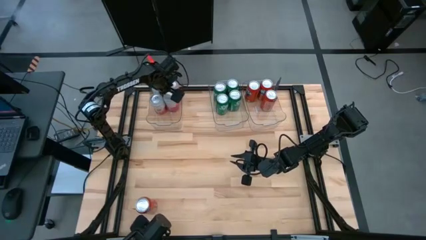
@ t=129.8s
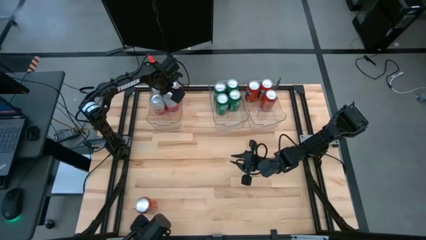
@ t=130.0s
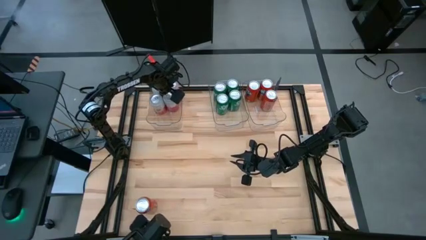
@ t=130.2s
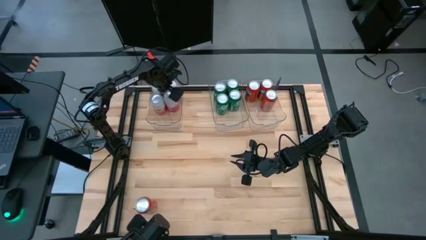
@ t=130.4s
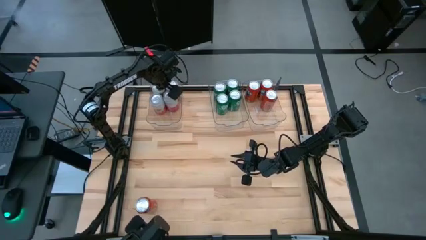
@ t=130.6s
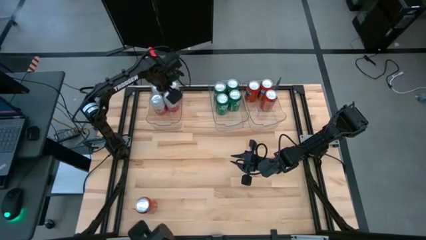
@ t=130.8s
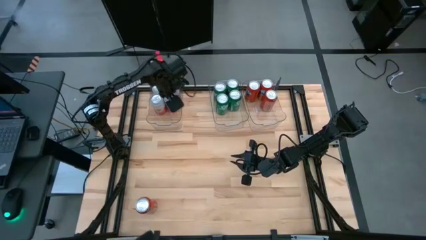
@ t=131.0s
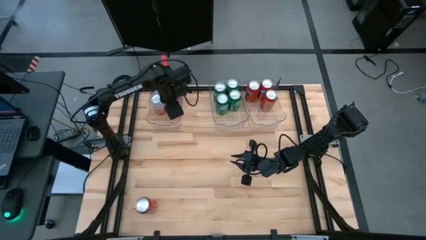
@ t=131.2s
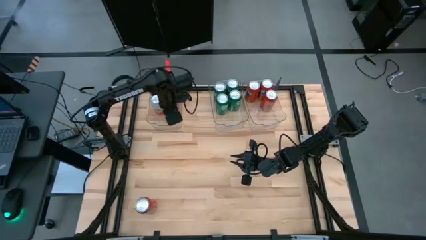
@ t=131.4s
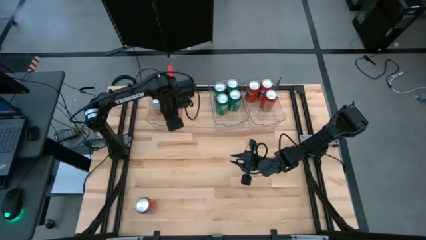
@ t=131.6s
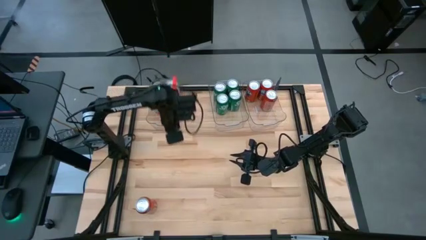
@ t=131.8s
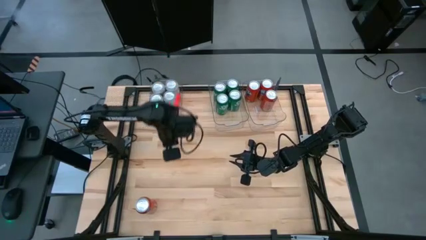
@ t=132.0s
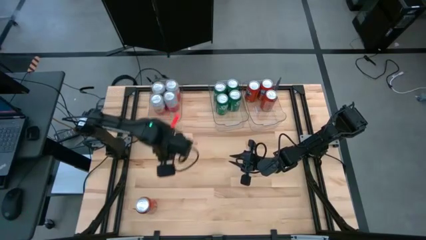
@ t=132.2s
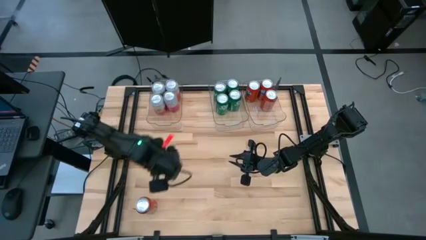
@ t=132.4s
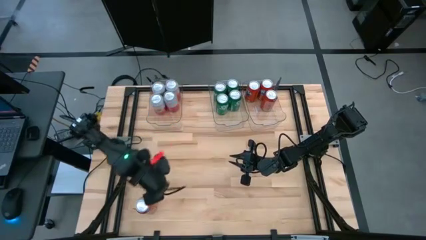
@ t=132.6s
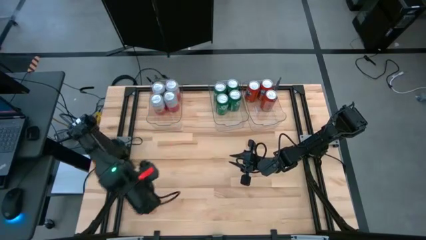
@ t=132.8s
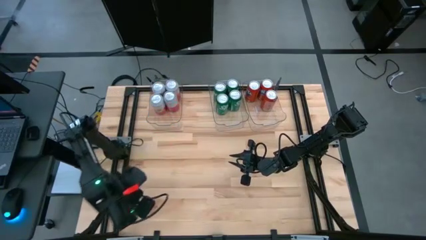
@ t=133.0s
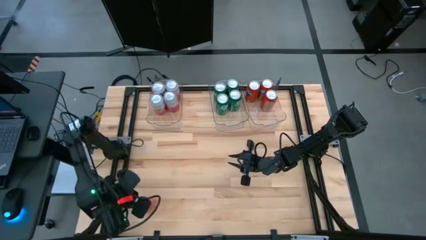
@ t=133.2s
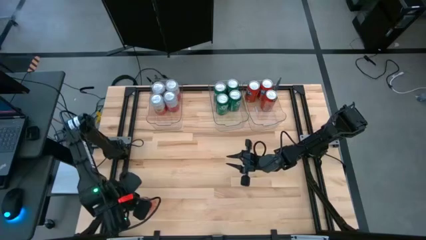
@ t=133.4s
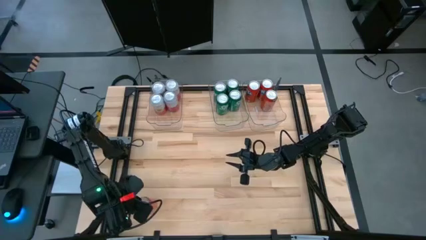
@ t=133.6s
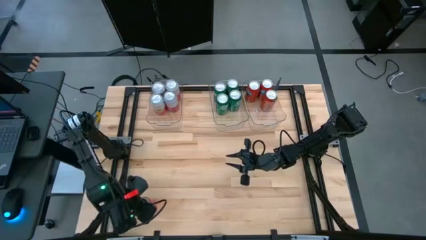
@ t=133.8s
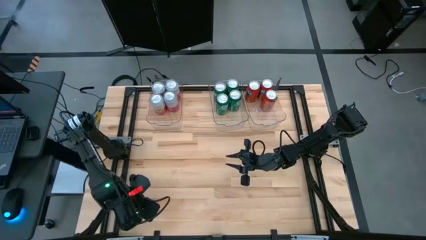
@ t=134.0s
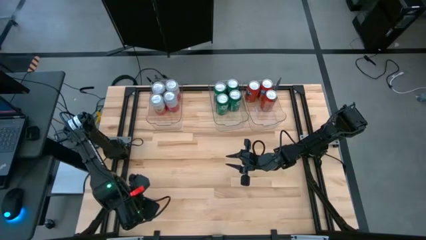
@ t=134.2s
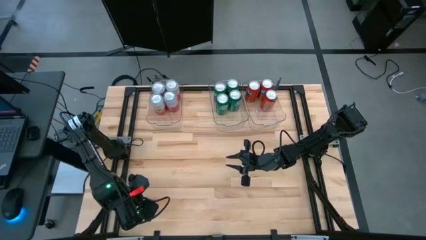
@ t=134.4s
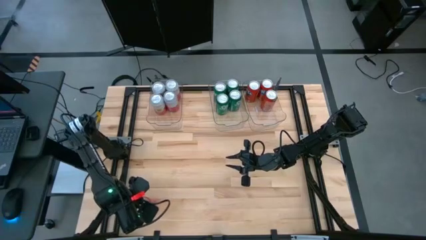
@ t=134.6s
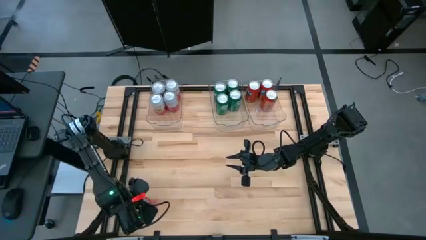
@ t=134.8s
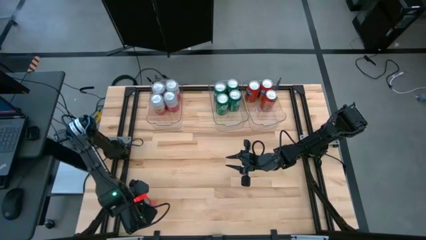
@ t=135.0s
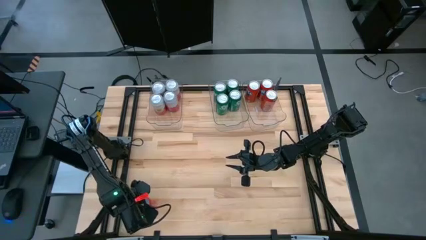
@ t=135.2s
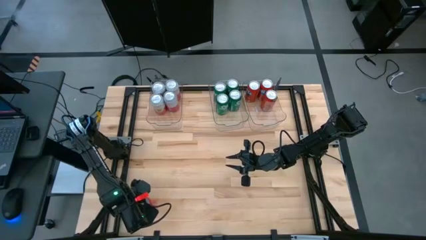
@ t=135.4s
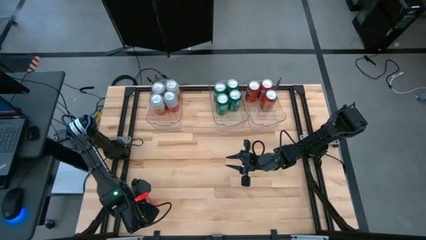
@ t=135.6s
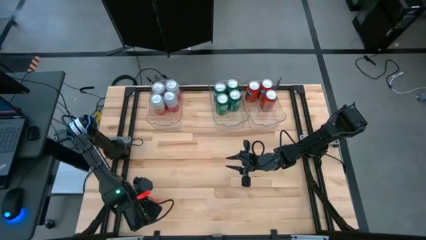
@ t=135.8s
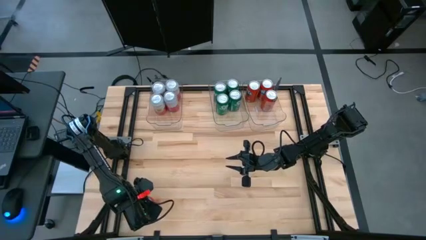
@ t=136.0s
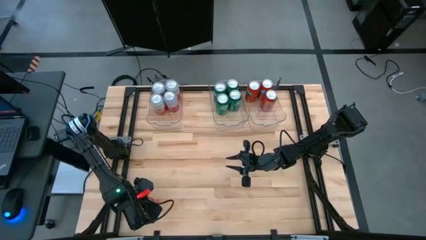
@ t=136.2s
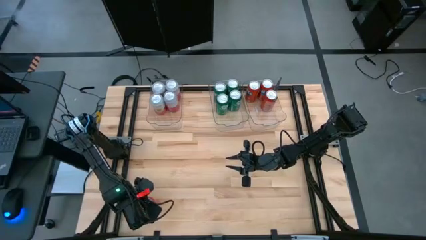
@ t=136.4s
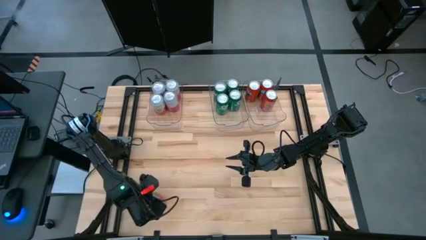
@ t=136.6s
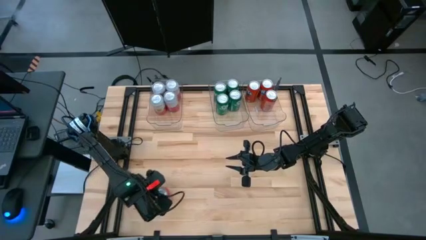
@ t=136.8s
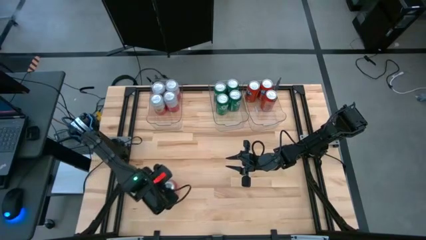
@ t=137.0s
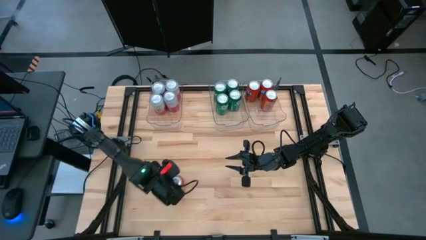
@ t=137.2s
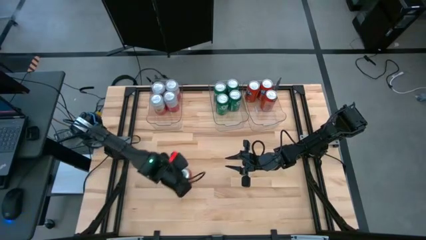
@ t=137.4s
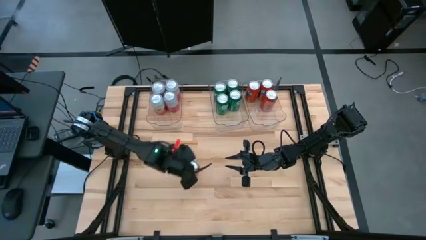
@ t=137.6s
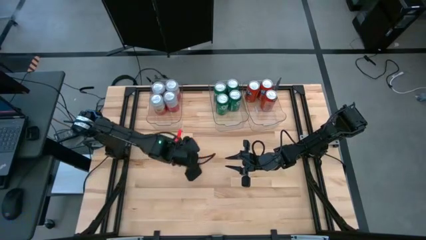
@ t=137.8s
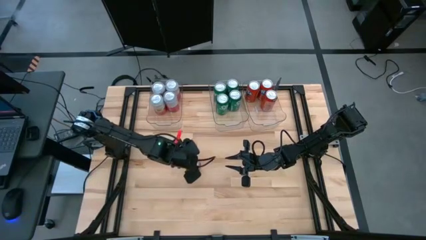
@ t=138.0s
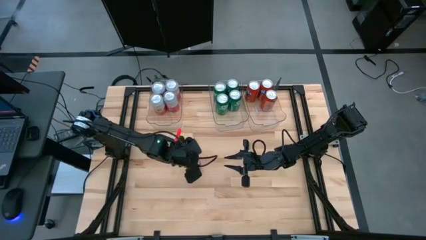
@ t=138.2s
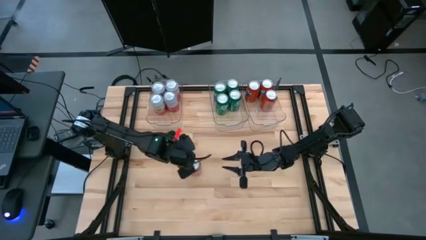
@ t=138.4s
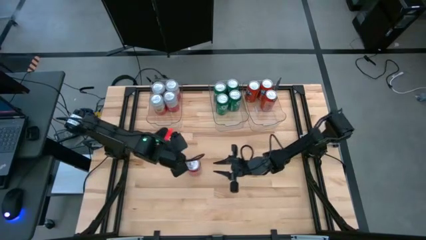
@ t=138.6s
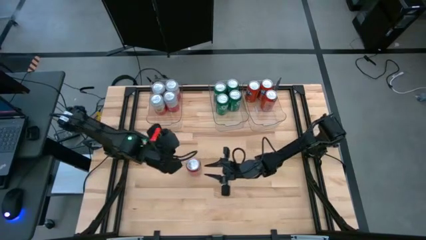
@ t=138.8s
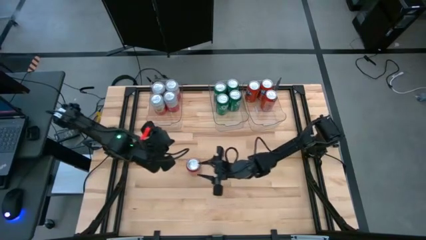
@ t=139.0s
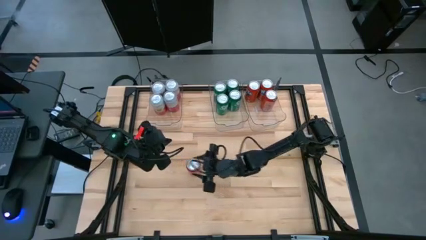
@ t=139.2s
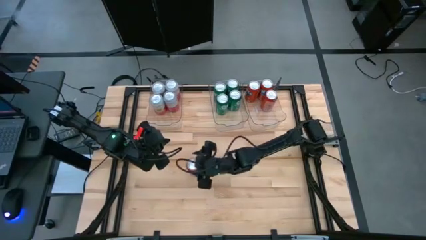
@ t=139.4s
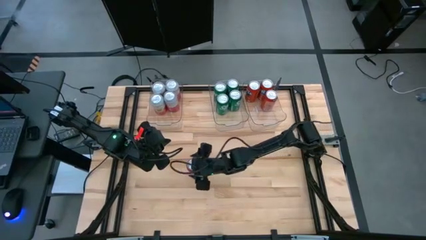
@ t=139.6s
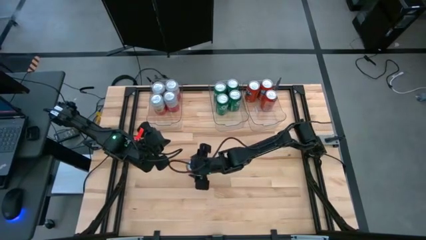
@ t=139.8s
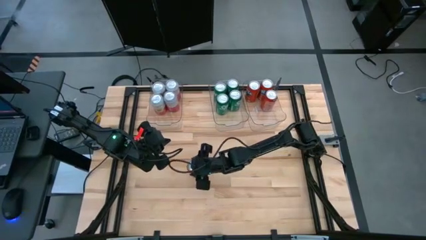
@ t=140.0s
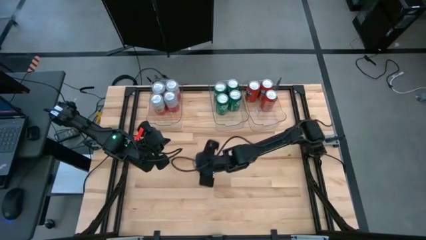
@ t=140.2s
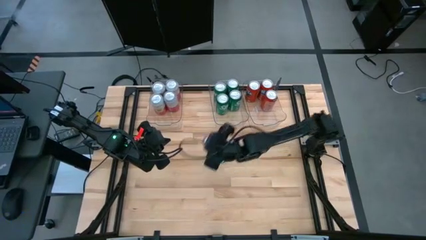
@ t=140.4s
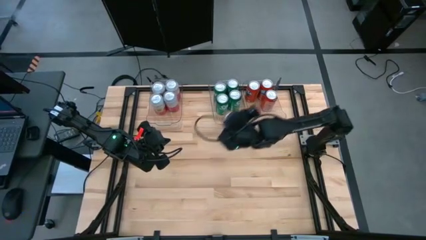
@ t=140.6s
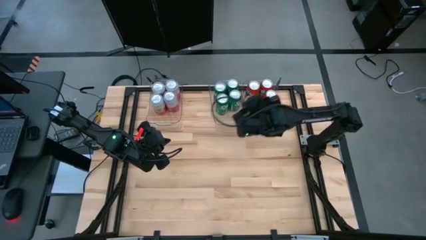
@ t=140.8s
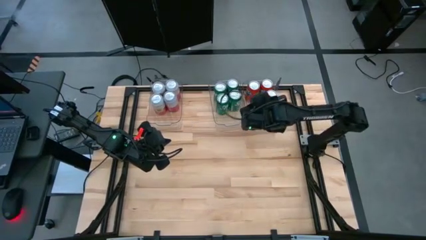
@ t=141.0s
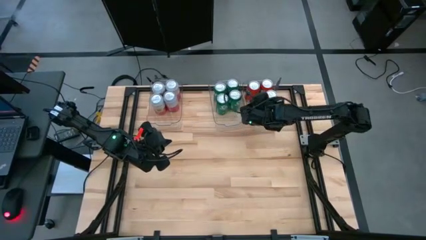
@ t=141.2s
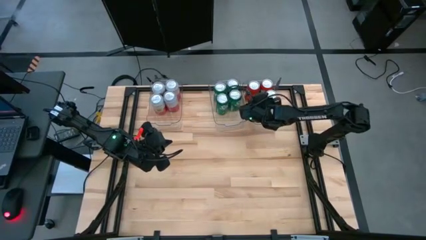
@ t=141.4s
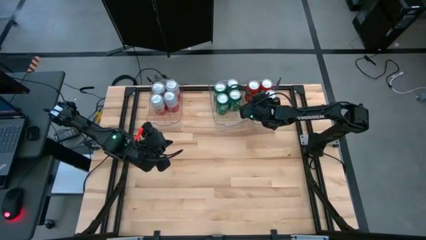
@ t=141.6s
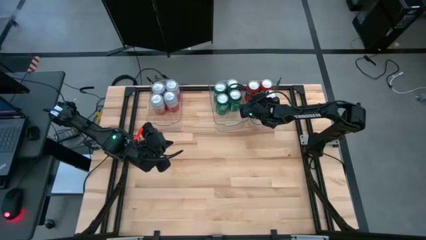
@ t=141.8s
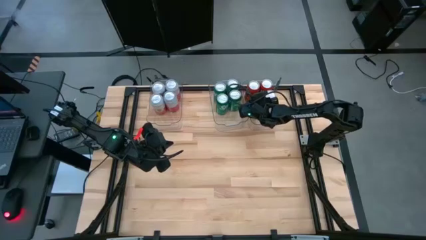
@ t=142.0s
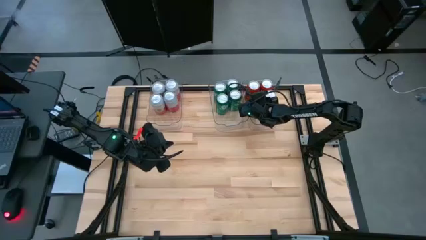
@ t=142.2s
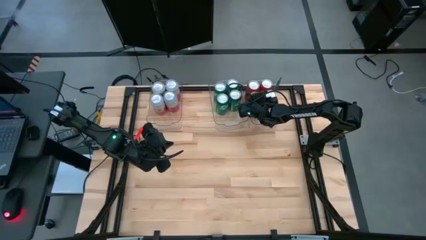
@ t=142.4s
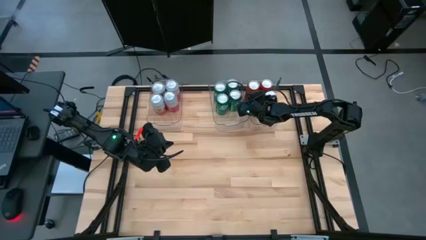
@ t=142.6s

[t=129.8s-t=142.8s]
Task: Sort soda cans
Put the orange soda can into the right transparent bin

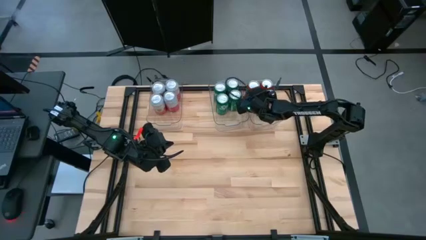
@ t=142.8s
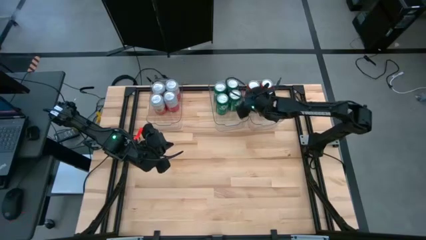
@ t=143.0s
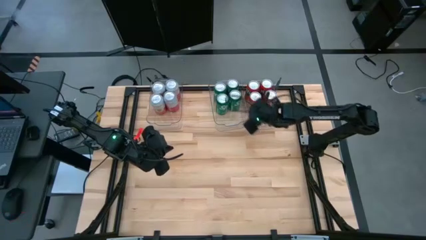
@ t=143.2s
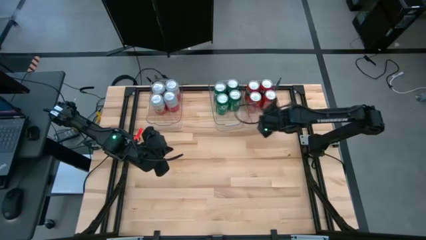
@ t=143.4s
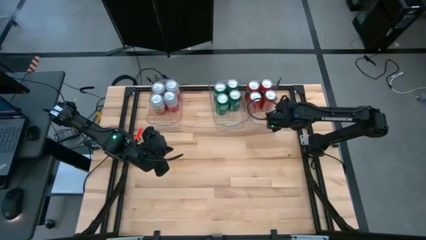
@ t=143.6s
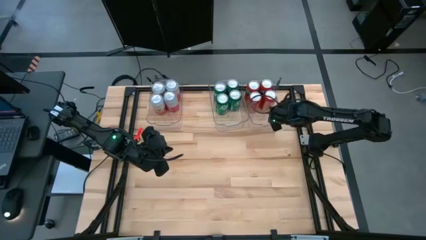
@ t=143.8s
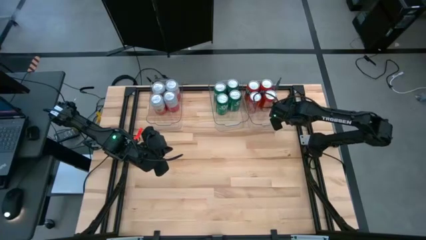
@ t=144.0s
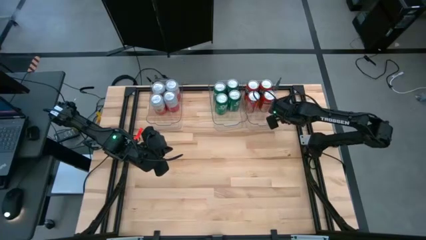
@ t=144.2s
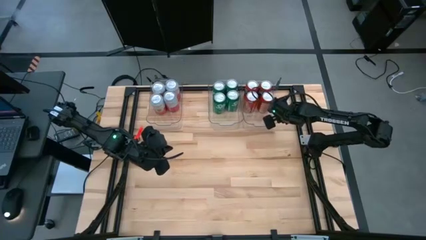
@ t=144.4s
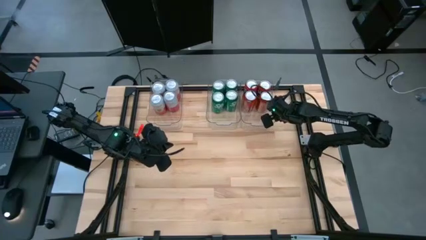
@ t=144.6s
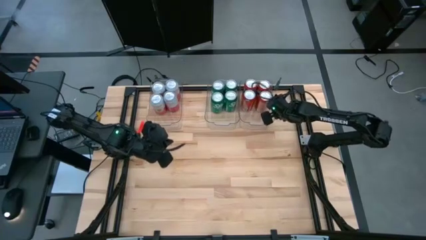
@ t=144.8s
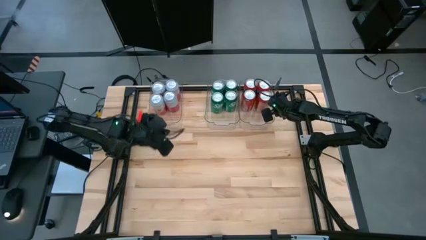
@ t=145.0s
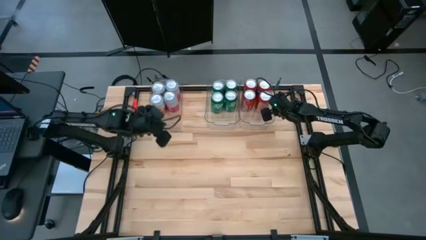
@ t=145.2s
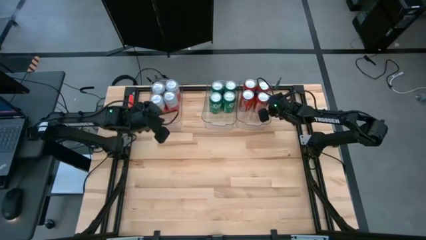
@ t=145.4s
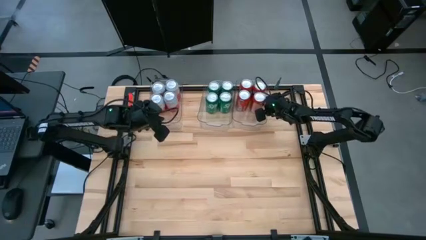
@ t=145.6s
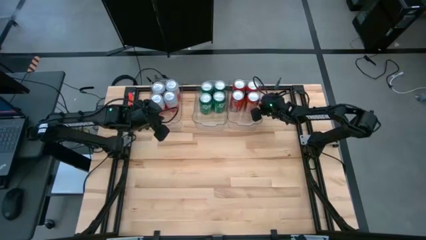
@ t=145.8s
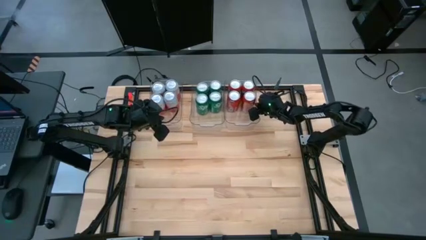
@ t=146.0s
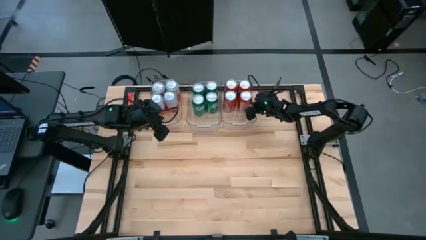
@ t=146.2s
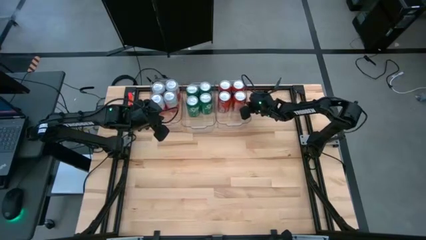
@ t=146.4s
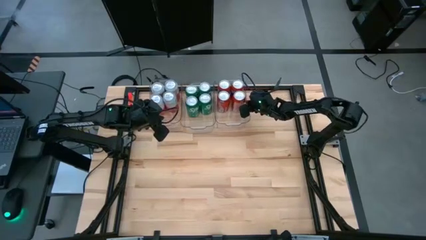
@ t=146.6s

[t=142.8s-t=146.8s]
Adjust the transparent bins
